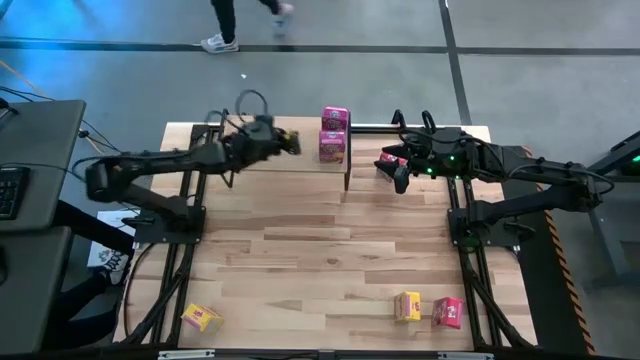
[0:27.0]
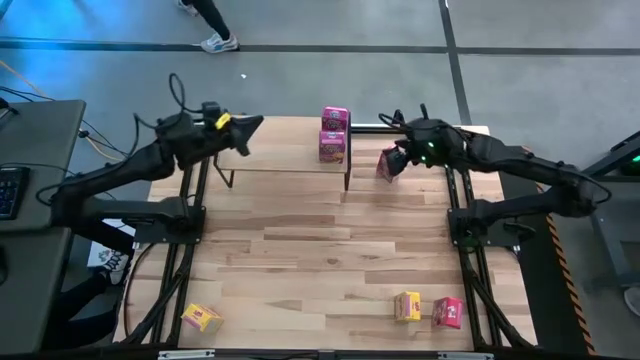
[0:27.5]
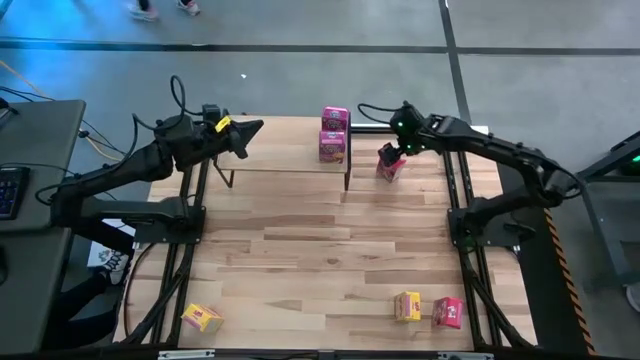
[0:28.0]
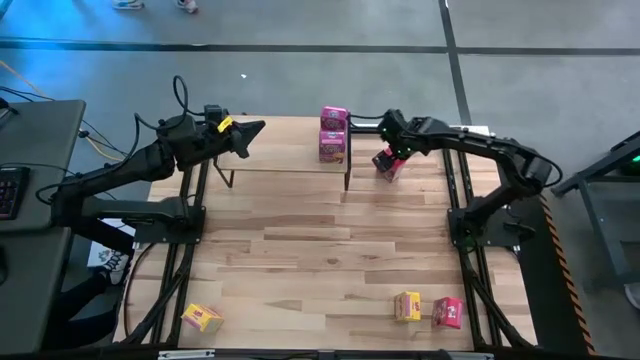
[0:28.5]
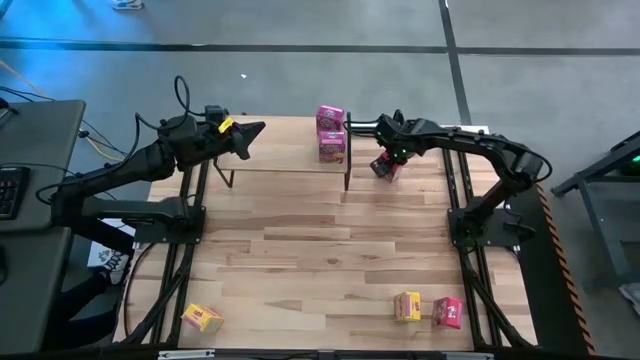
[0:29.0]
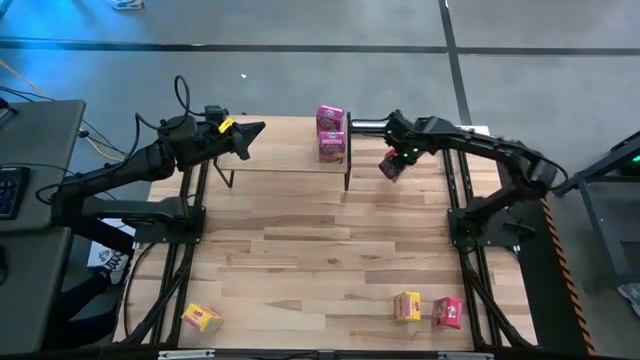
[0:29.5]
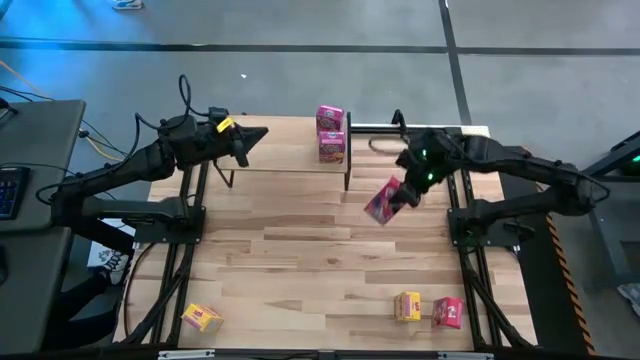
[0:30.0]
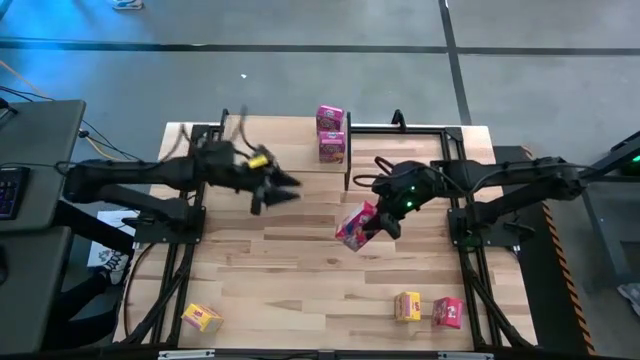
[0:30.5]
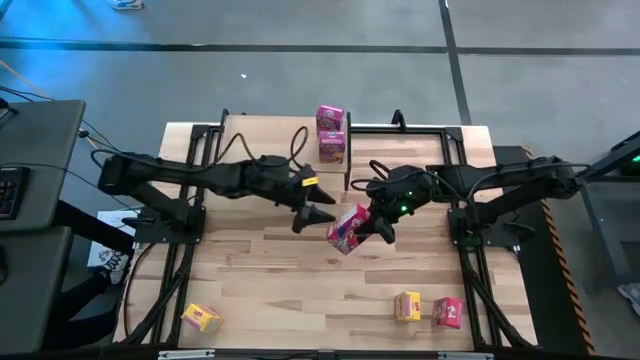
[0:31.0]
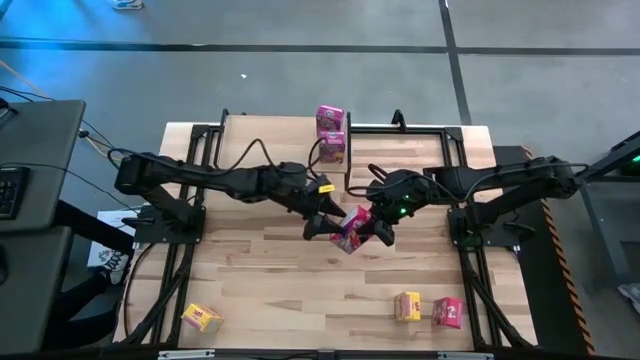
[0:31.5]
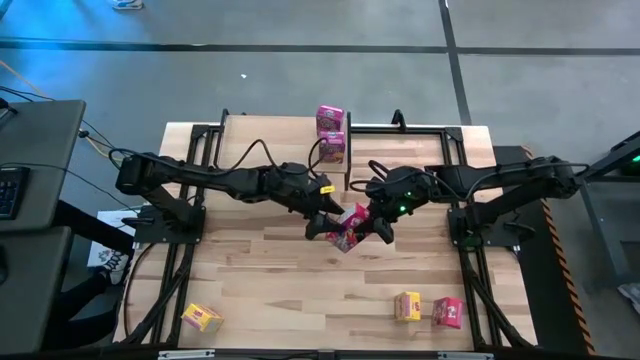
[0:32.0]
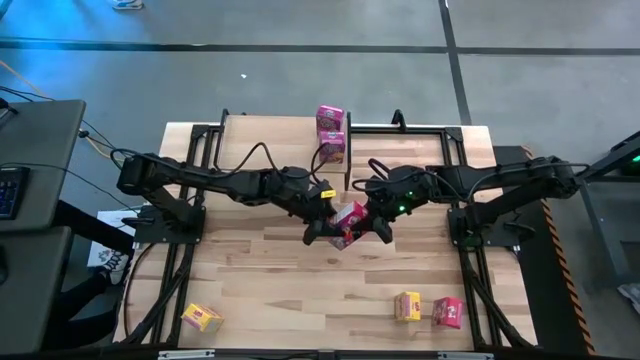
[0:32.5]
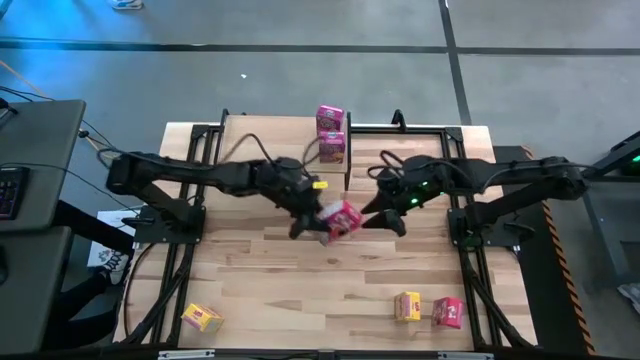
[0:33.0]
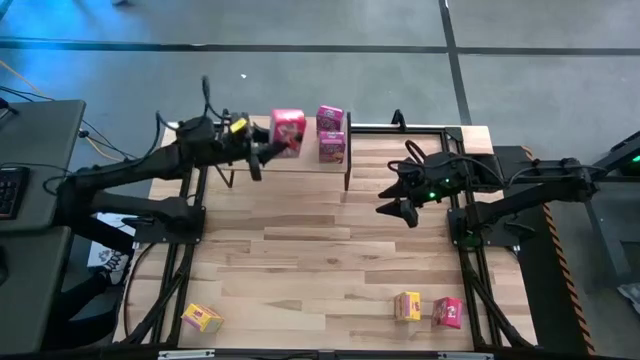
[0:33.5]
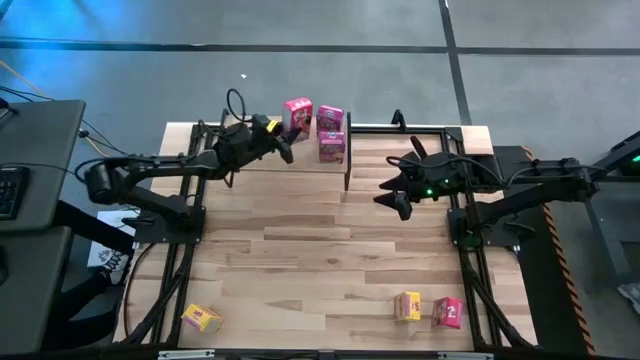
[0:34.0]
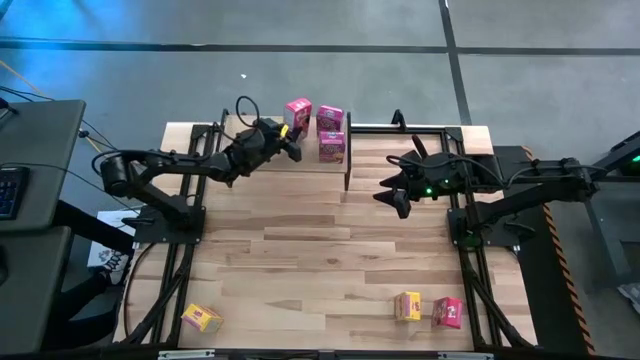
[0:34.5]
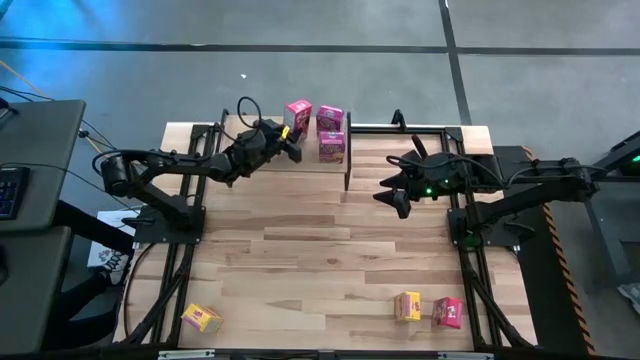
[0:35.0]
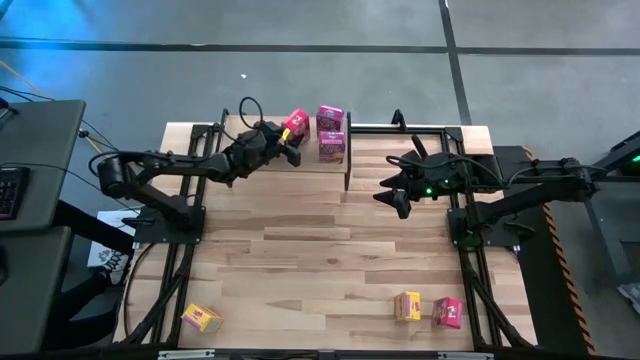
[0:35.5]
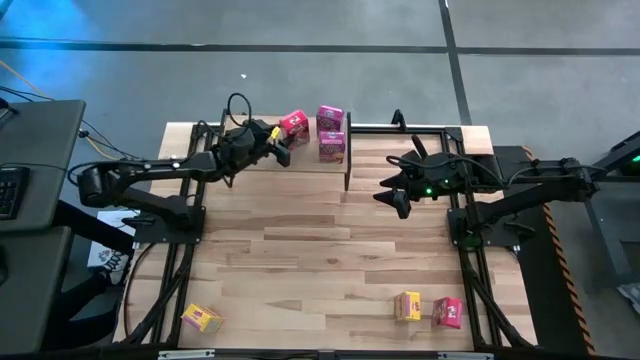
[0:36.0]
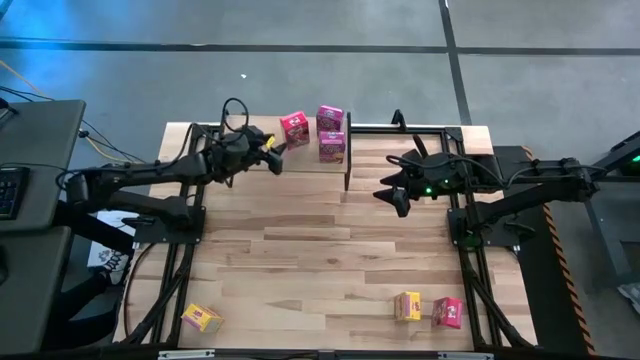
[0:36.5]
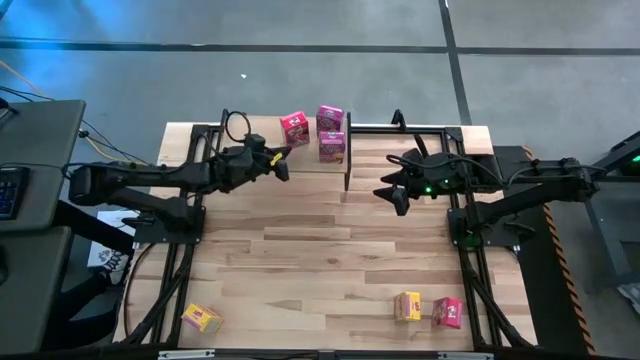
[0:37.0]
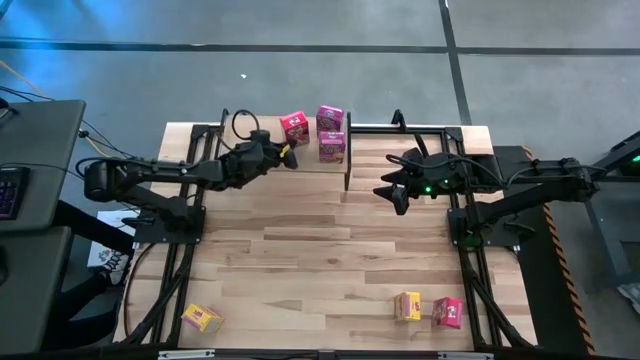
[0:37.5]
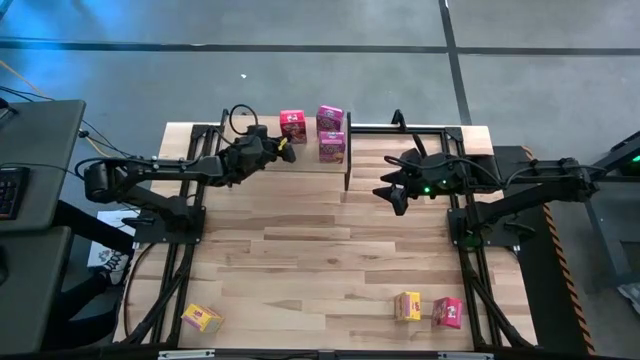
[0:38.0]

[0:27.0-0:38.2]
Task: Stack cereal on shelf
Put the top red cereal box on the shelf

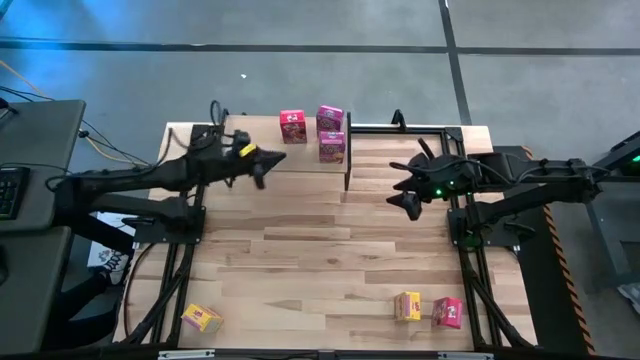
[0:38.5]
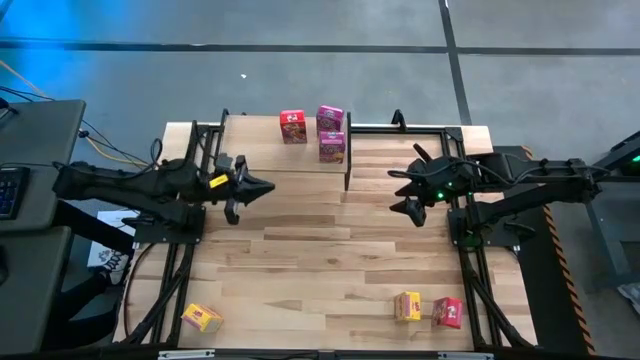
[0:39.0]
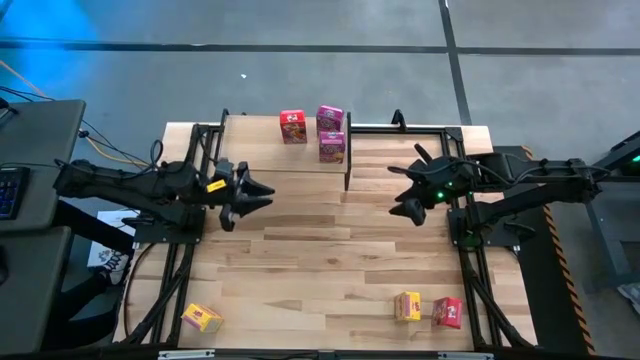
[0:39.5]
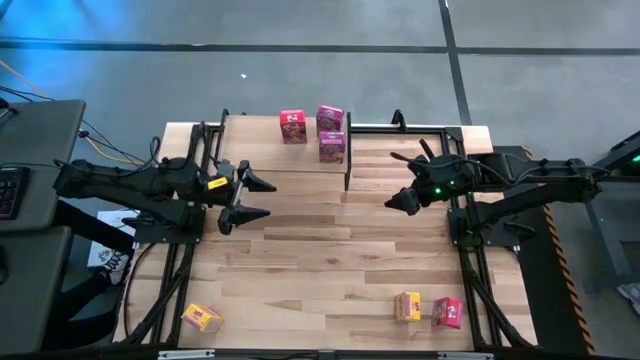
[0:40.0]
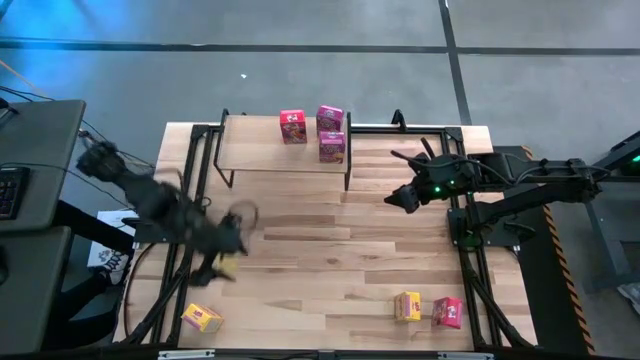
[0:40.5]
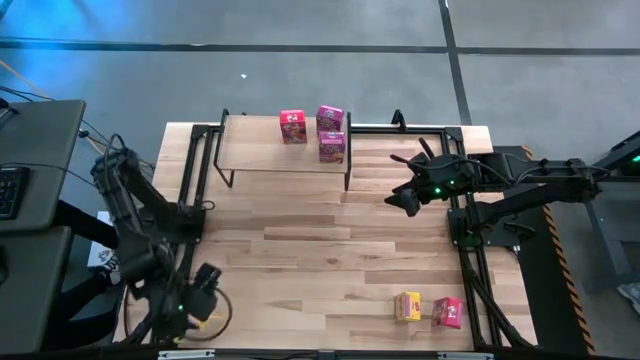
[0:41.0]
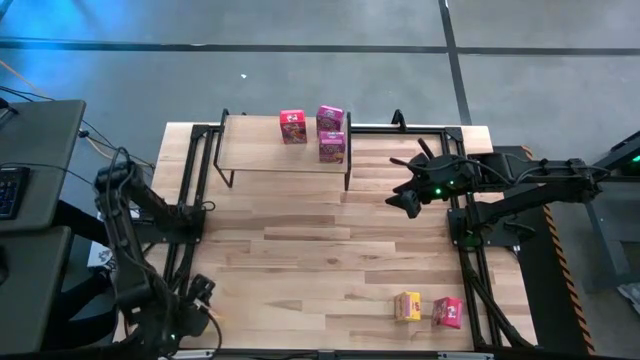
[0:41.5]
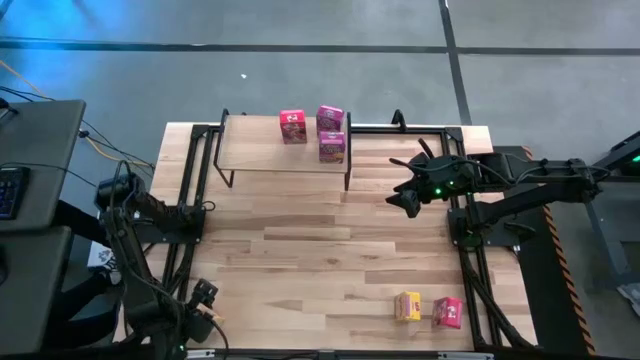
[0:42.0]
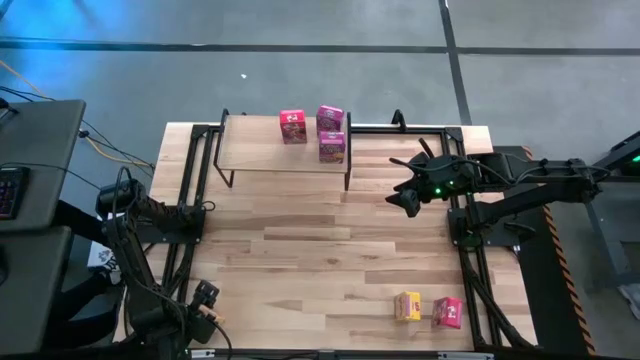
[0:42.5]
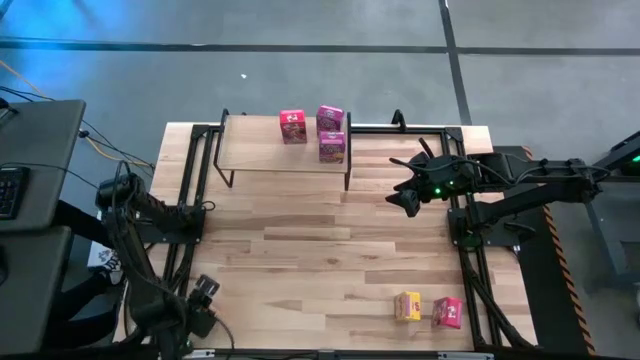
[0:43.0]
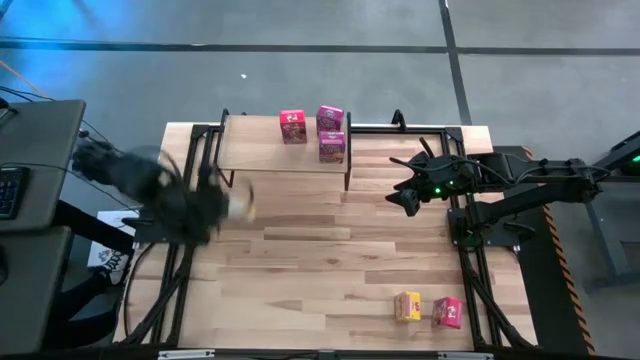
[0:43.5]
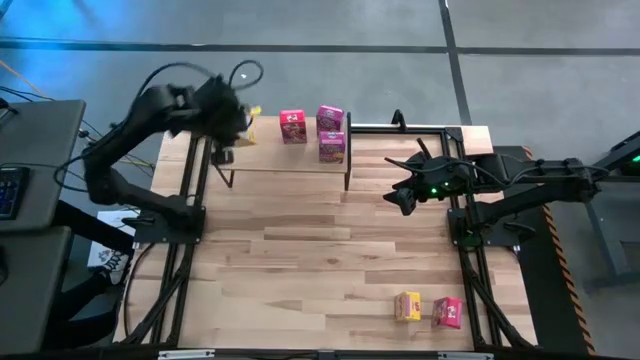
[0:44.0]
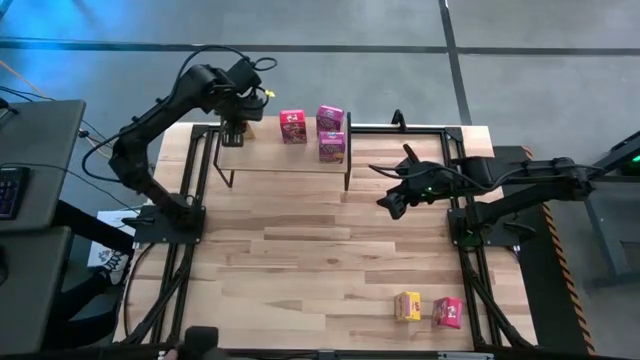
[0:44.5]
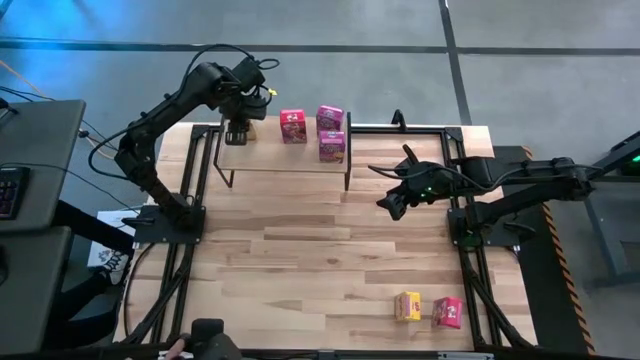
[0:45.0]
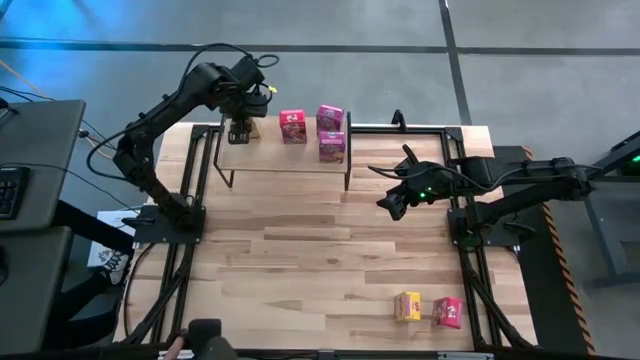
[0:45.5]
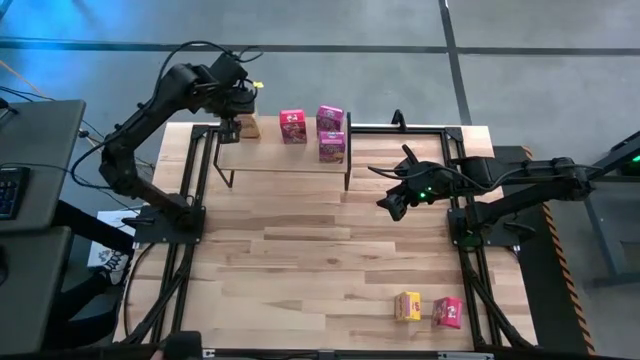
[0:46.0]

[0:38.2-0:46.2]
Put the left yellow cereal box on the shelf

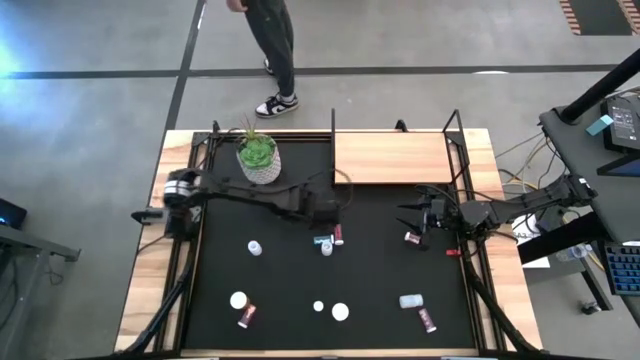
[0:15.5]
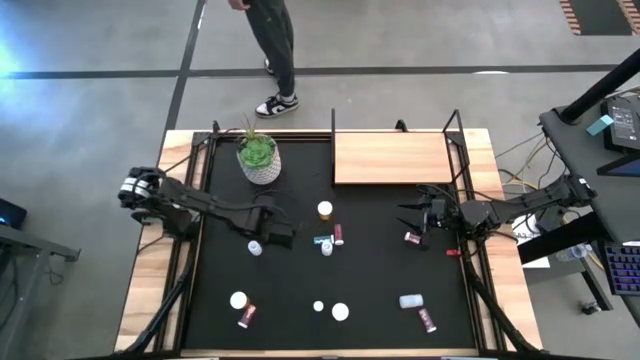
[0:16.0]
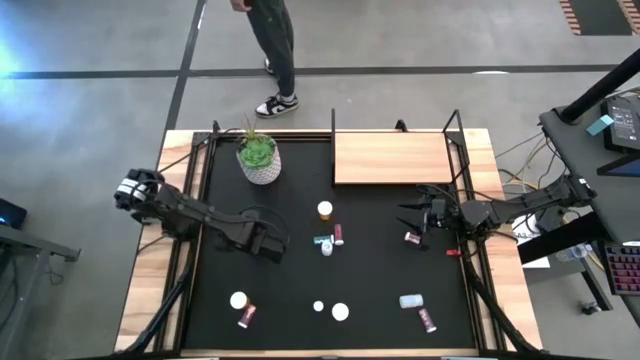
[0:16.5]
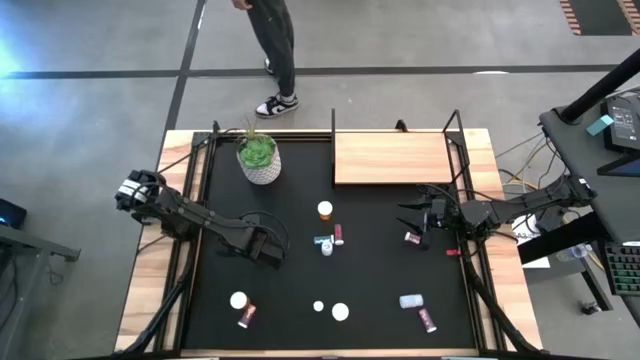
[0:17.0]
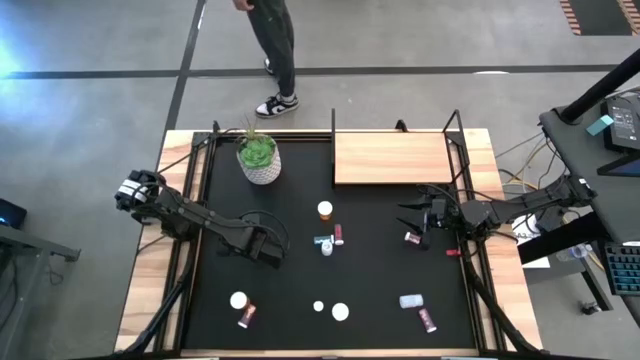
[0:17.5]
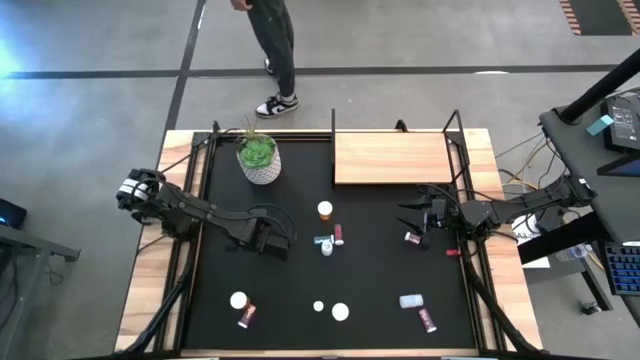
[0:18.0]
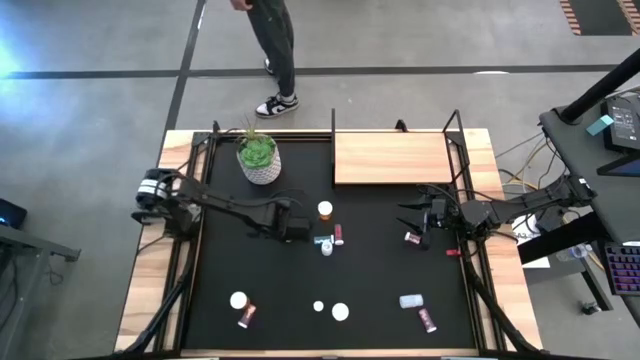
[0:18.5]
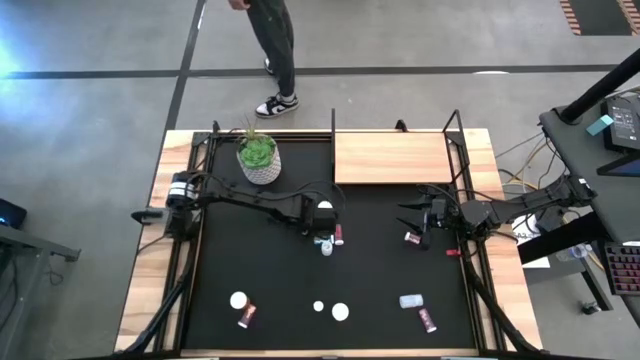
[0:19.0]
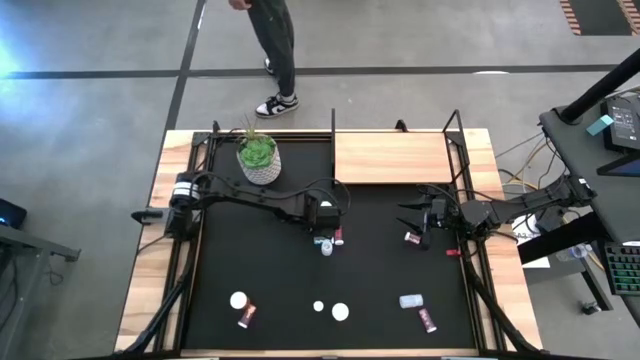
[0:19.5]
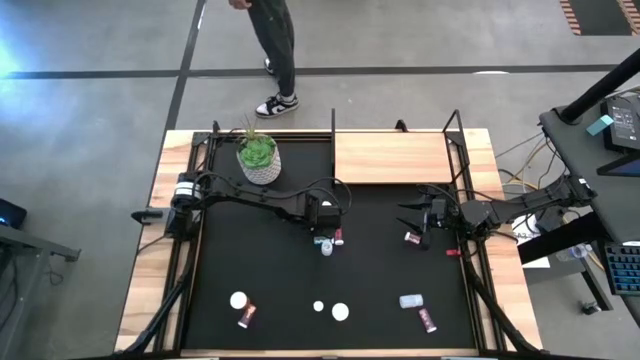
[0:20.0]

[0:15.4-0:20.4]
Task: Pick and place medicine bottles onto shelf by color
Move the top left white pill bottle to the center of the table
